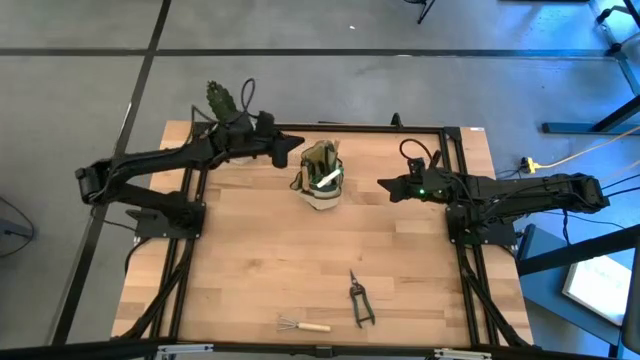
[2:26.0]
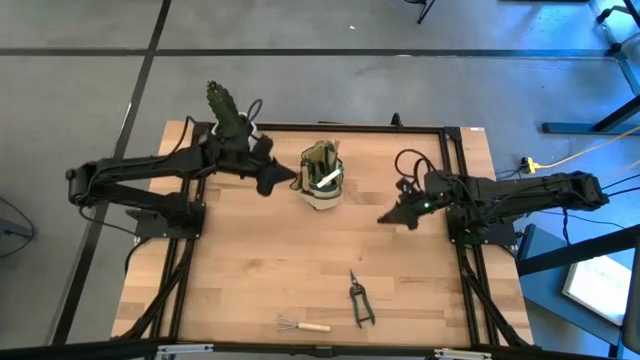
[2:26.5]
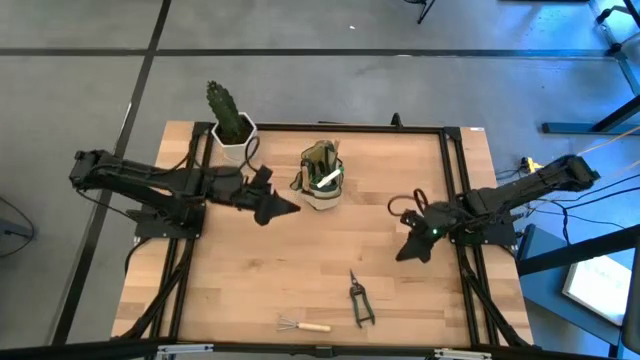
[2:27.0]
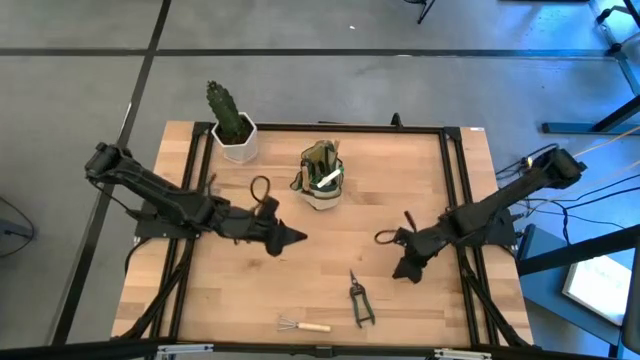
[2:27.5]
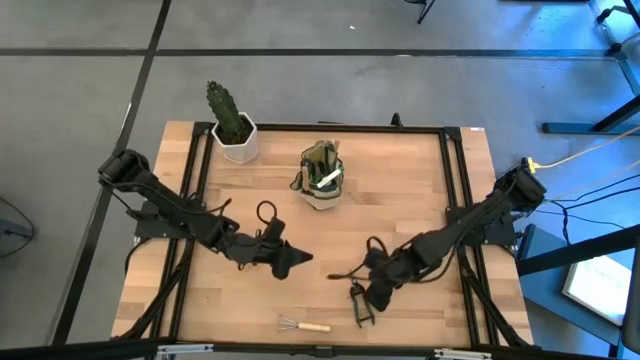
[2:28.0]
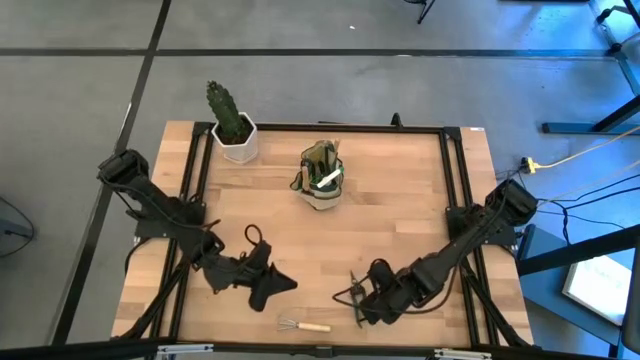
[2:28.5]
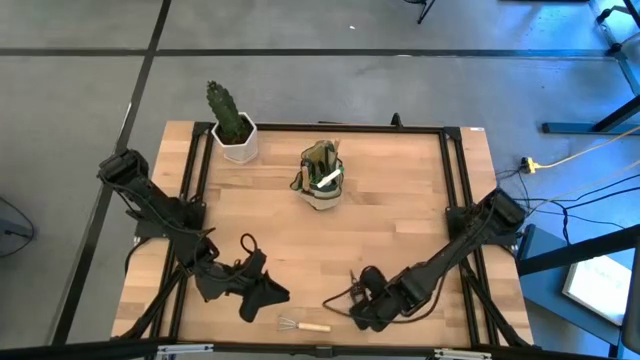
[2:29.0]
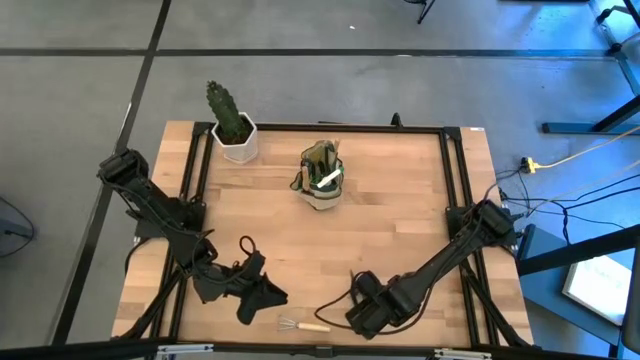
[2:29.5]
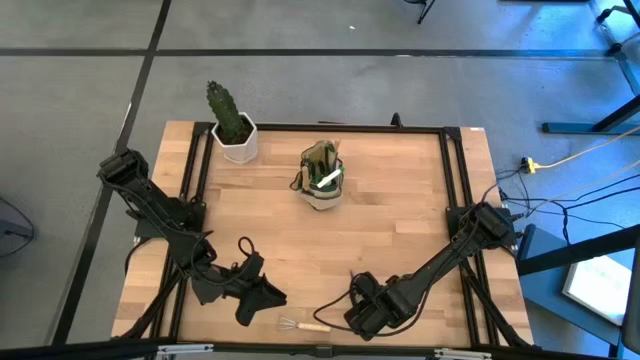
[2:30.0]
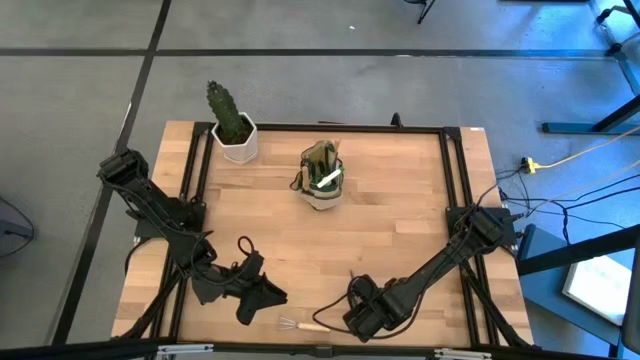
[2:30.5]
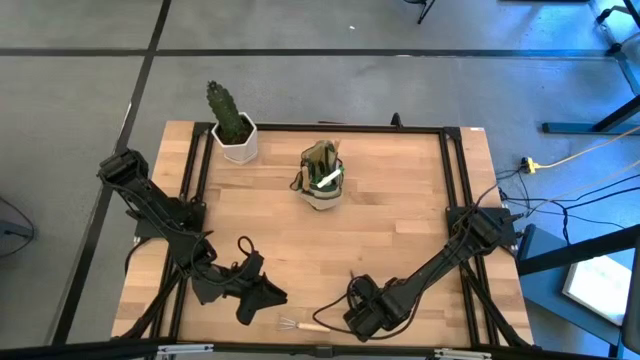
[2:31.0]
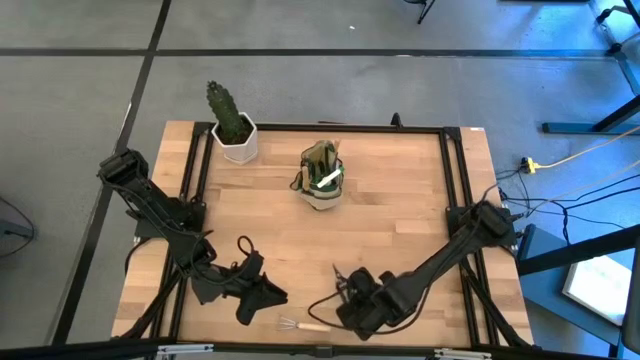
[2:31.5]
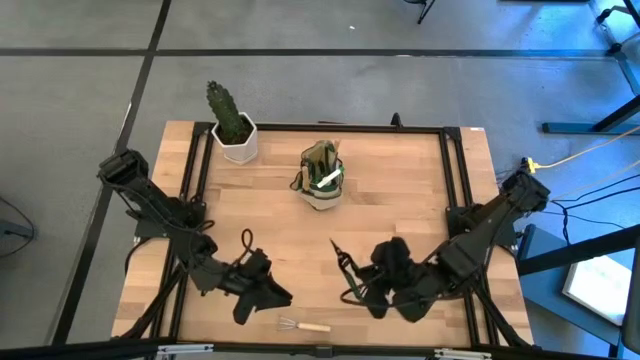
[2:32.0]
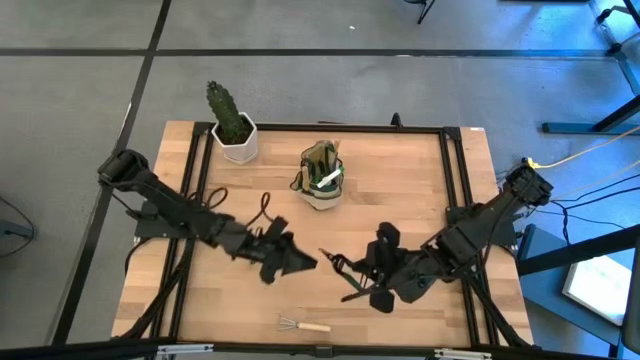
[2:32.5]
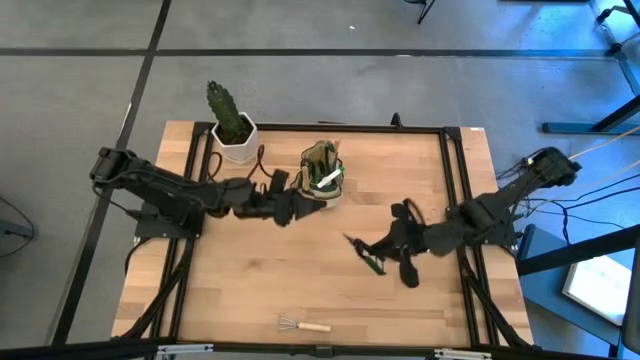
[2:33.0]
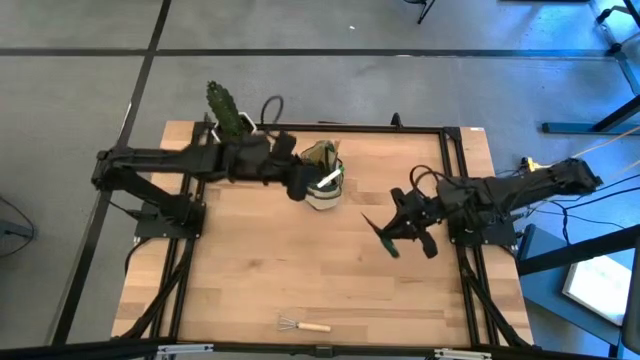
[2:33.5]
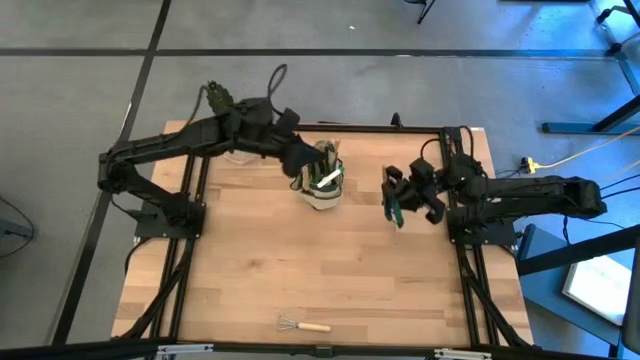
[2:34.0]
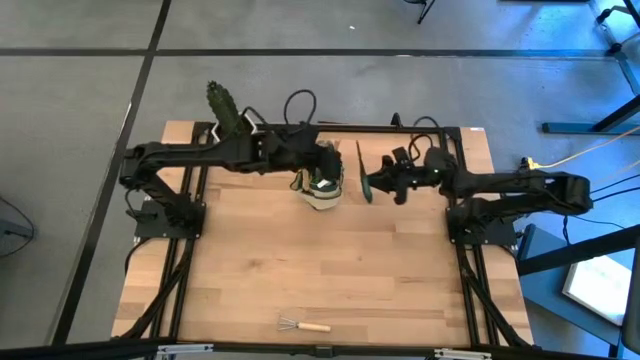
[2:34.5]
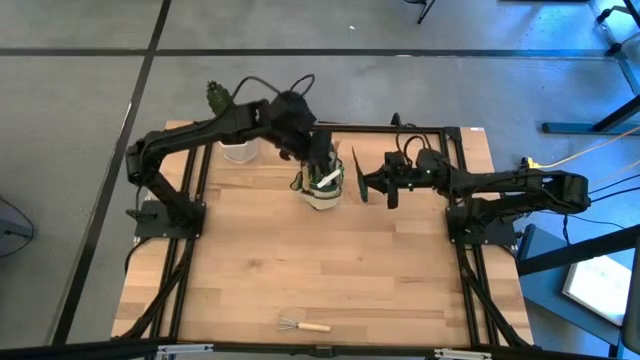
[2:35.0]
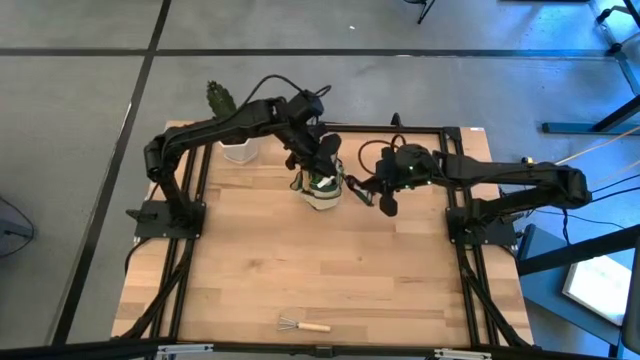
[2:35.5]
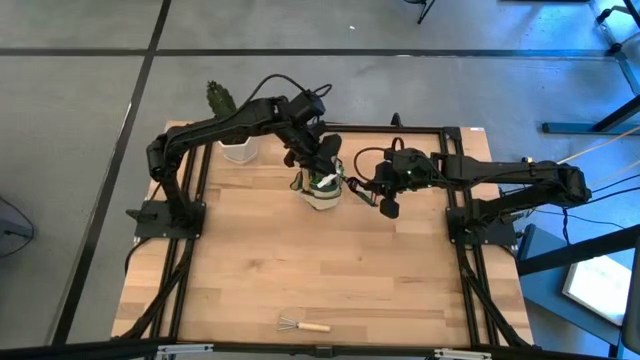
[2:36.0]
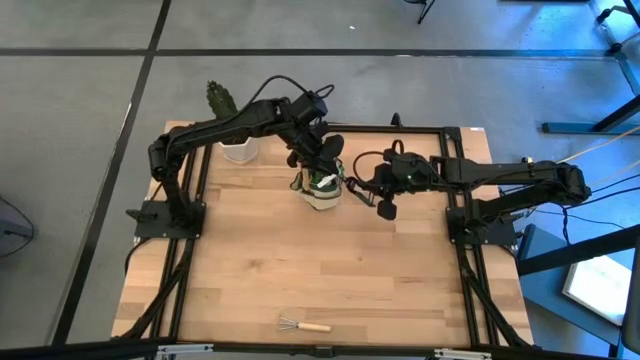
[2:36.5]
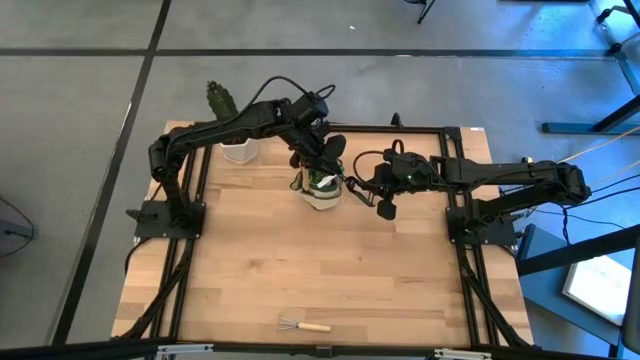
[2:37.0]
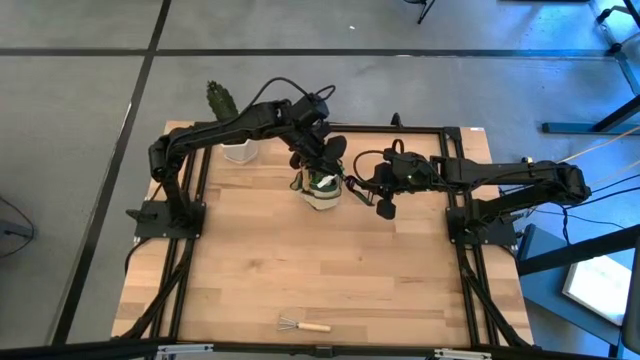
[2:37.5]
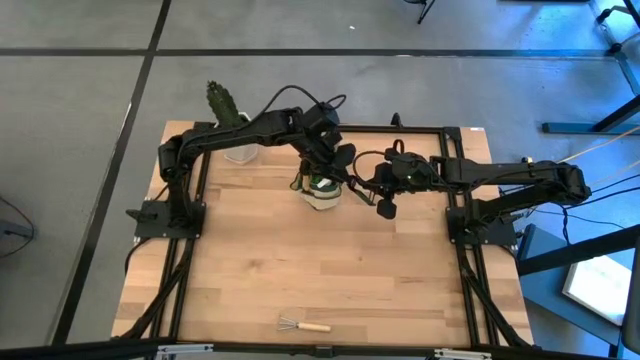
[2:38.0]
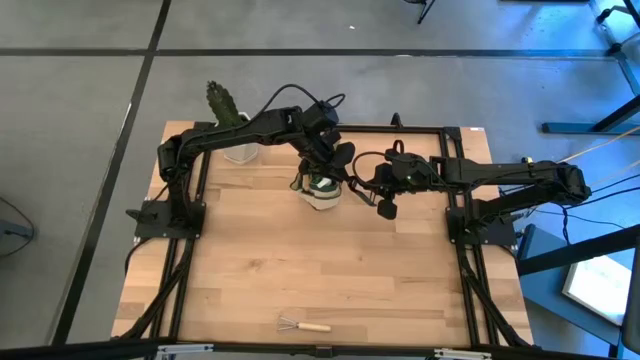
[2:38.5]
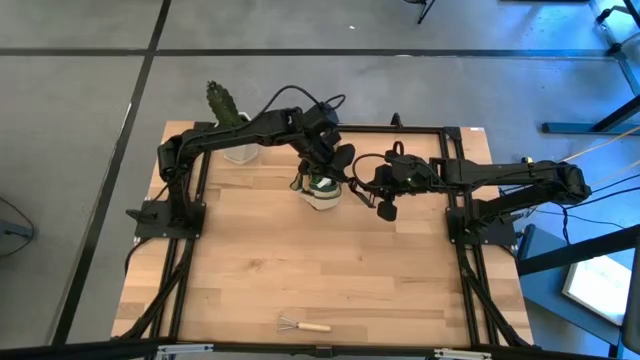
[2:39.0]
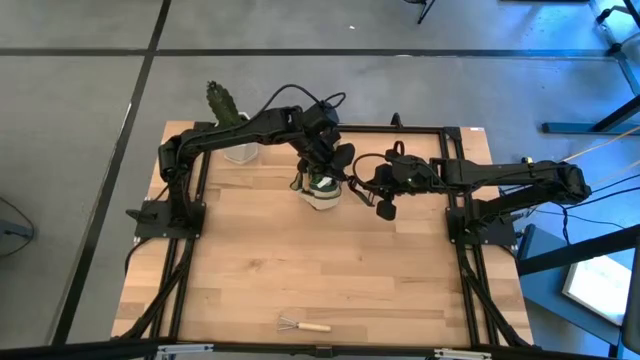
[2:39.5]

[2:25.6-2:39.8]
Task: Pick & Place Garden tools in Gardening bag
Put the fruit pruner into the gardening bag

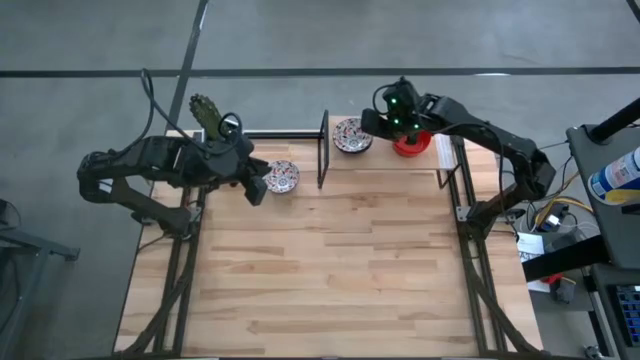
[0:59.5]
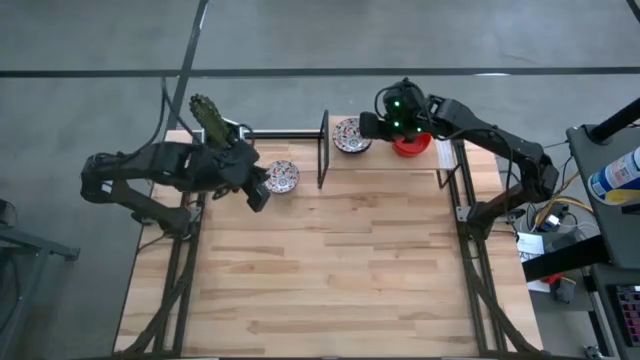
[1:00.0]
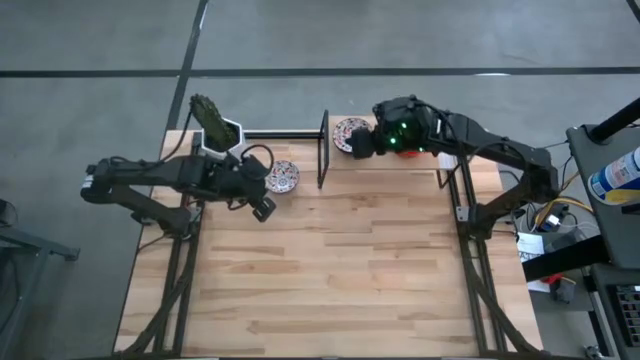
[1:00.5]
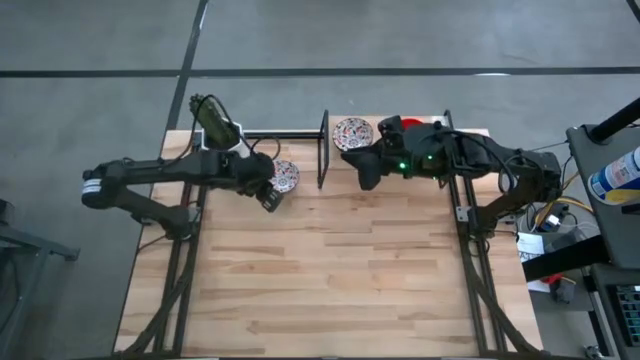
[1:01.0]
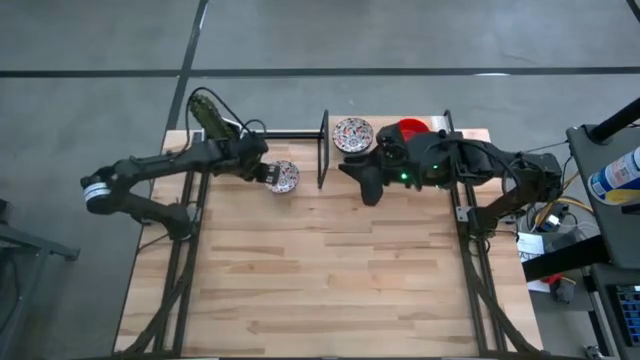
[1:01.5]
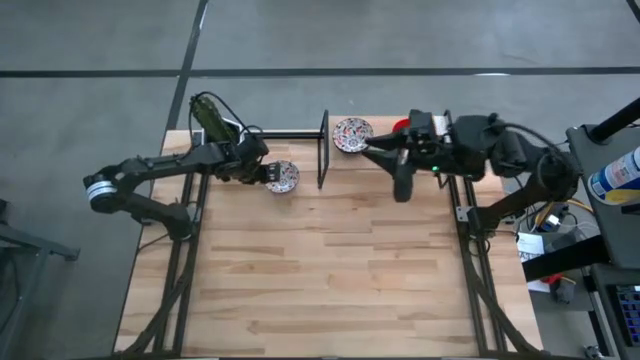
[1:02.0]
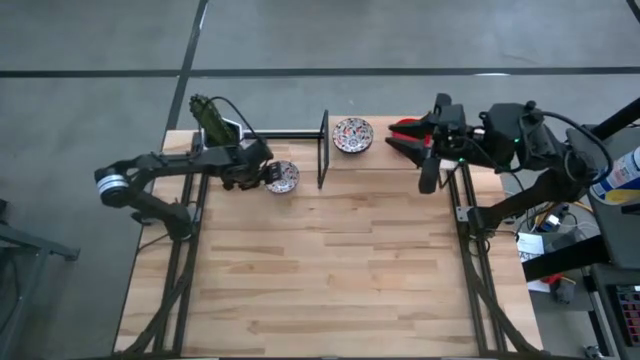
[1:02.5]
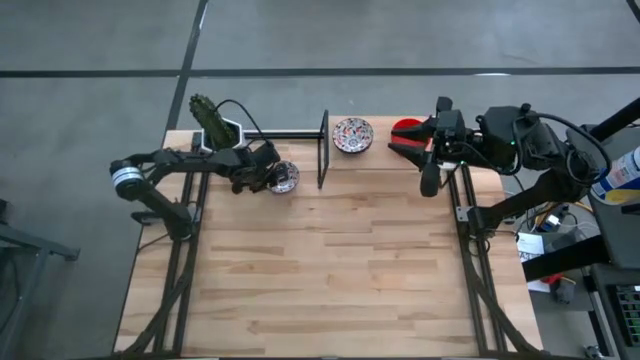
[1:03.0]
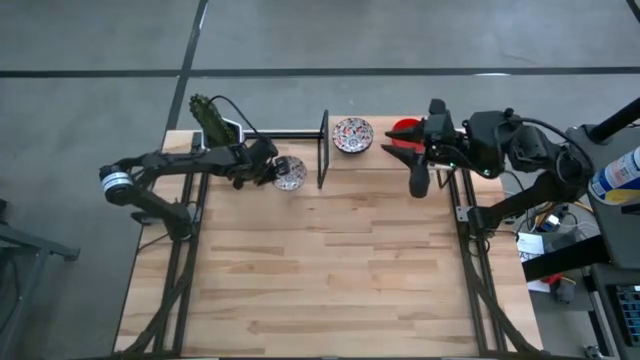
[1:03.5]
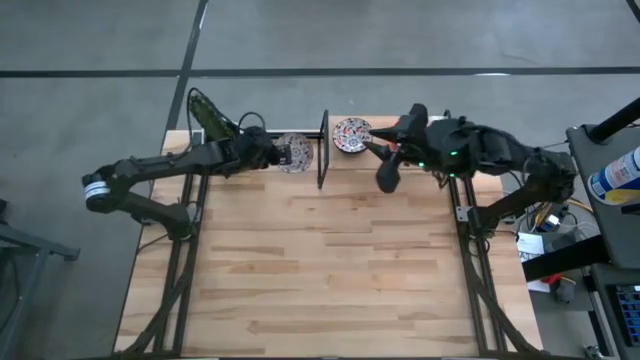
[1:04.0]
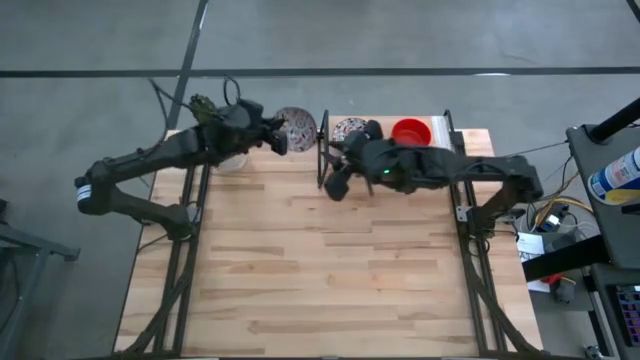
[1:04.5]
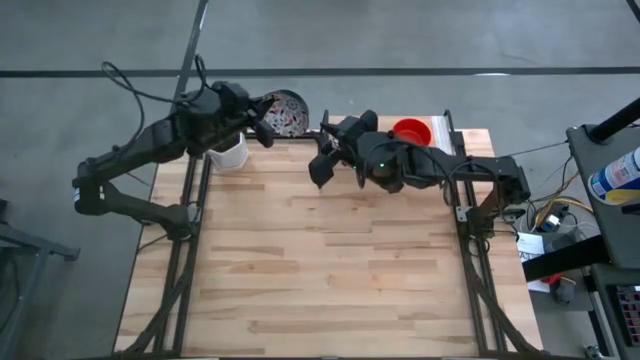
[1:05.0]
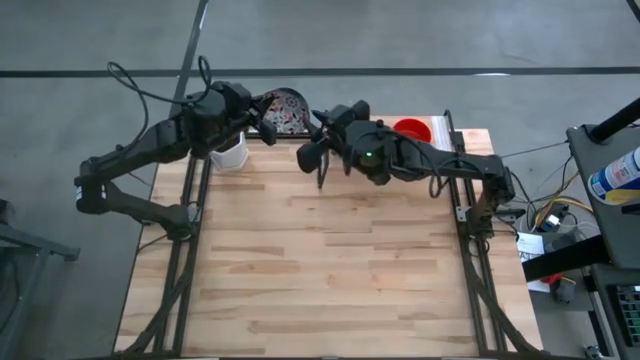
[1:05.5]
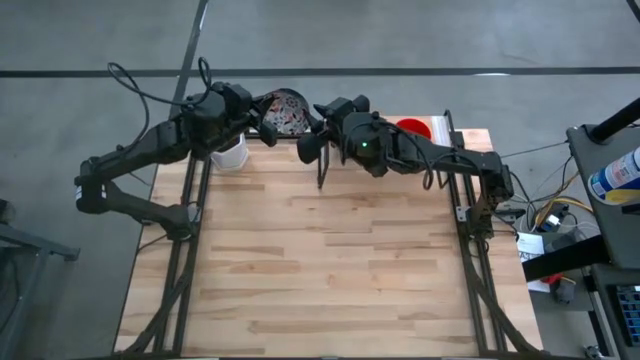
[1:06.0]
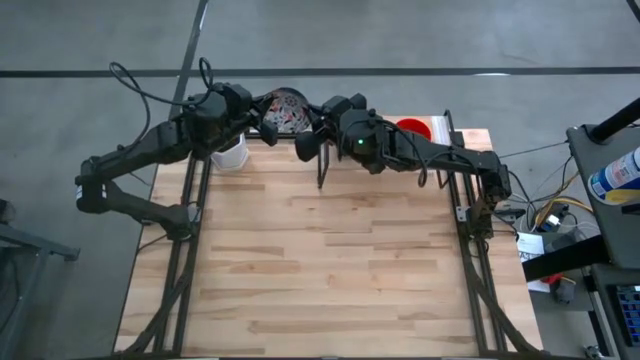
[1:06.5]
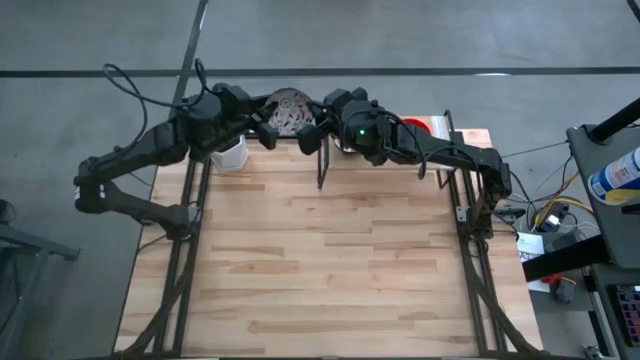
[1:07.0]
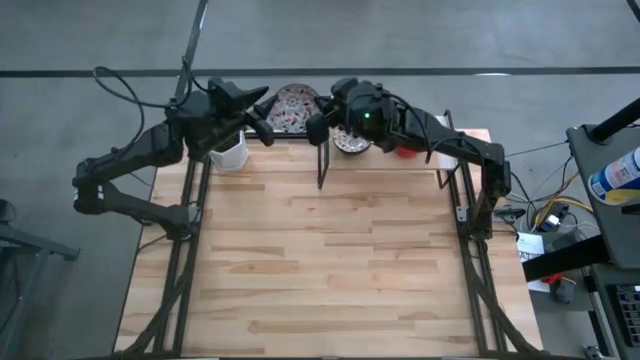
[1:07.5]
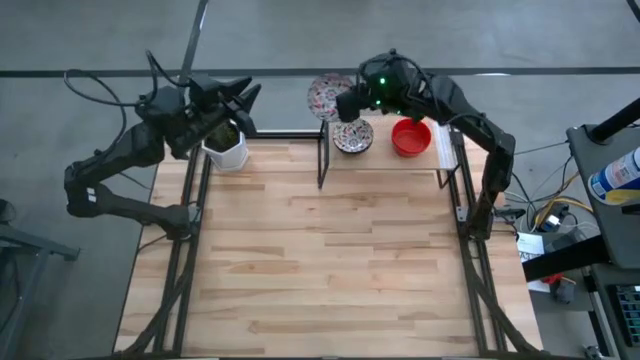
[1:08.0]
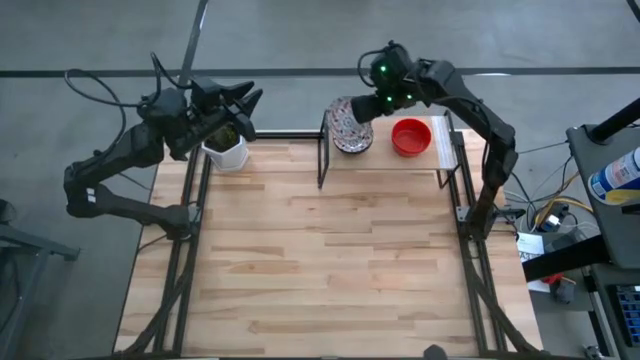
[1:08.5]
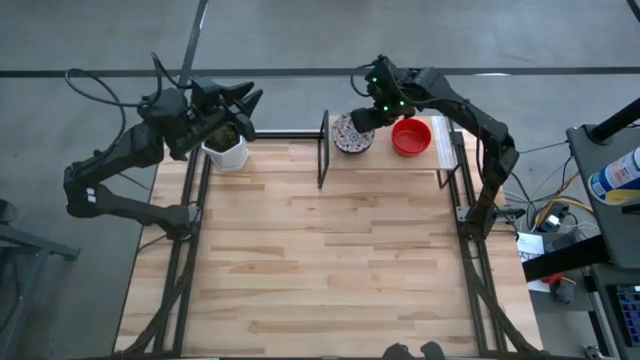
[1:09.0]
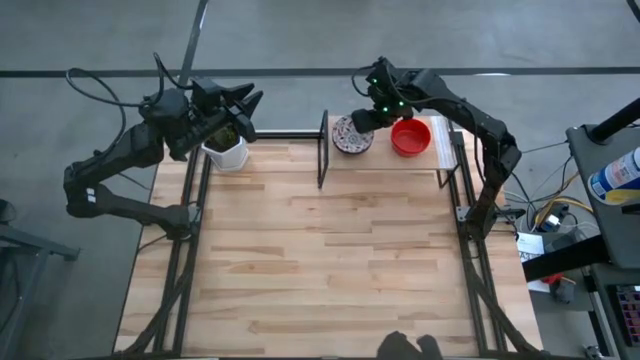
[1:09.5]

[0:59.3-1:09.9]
Task: Pick & Place Mini bowls
Stack the white patterned bowl on top of the other white patterned bowls on the shelf
